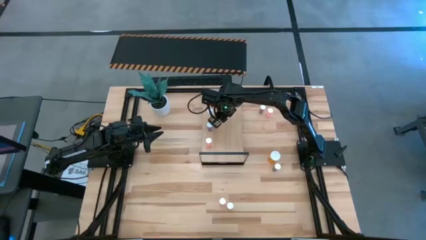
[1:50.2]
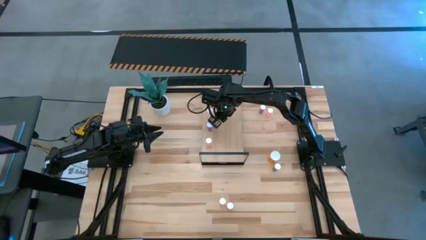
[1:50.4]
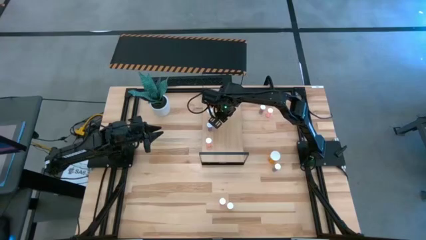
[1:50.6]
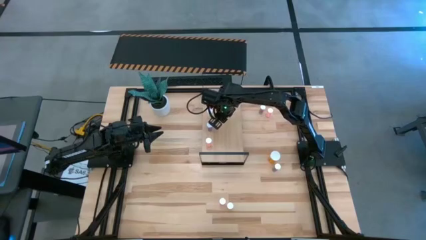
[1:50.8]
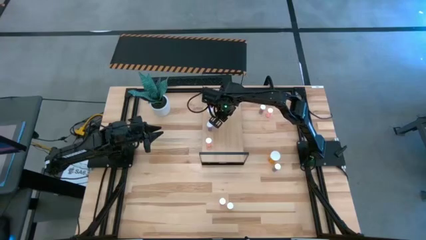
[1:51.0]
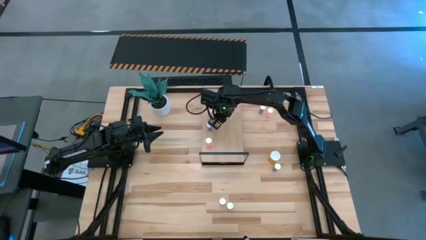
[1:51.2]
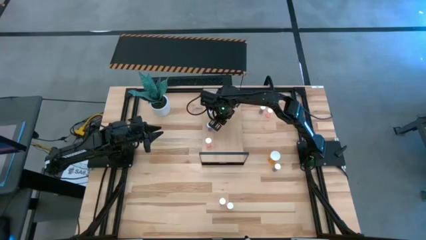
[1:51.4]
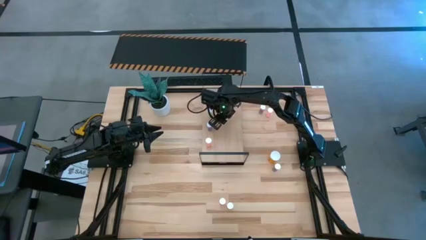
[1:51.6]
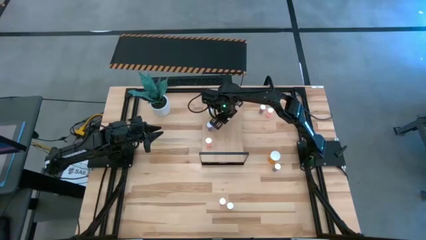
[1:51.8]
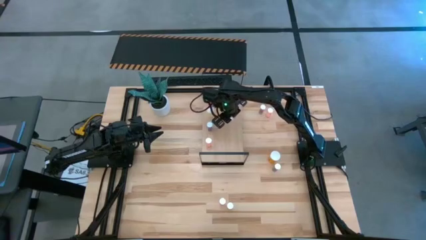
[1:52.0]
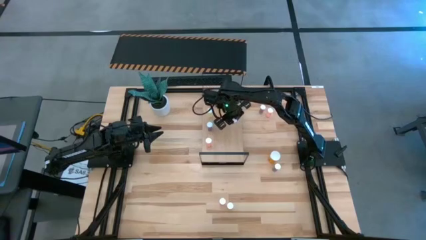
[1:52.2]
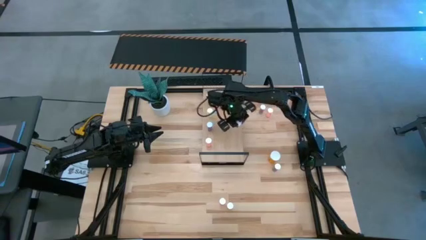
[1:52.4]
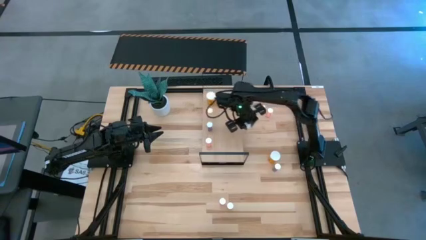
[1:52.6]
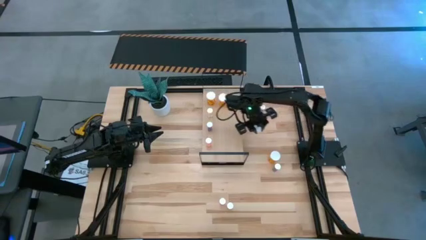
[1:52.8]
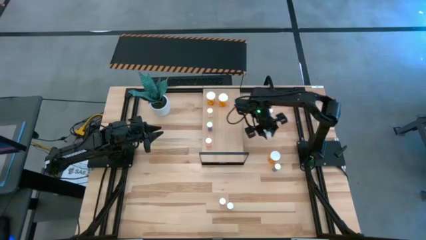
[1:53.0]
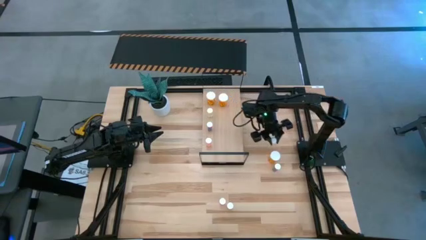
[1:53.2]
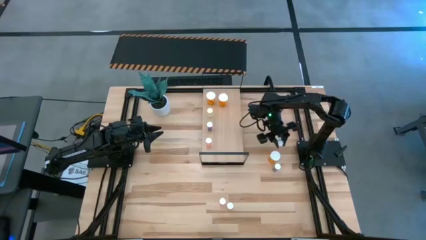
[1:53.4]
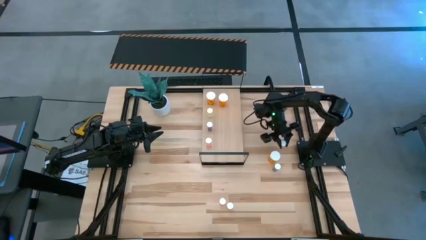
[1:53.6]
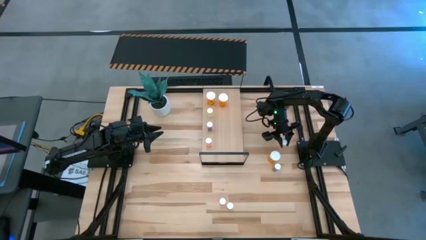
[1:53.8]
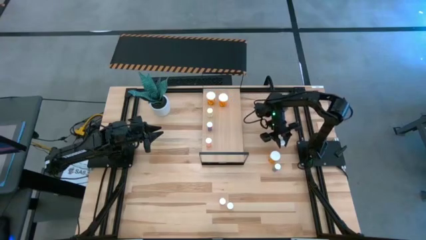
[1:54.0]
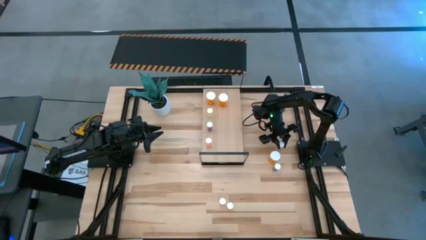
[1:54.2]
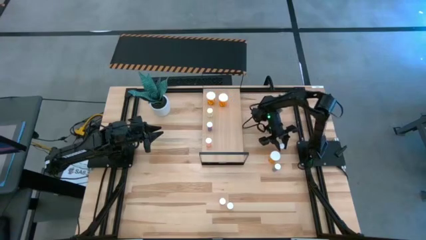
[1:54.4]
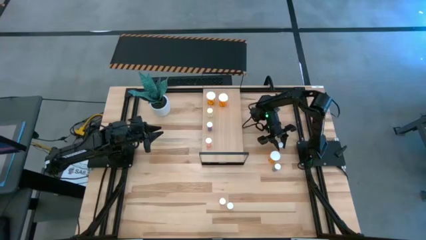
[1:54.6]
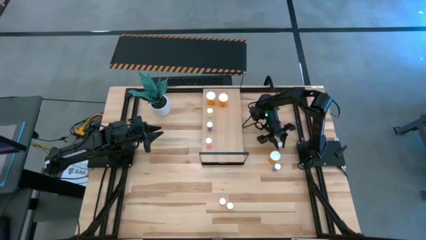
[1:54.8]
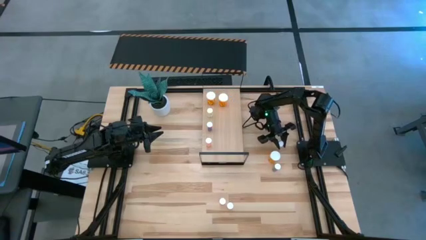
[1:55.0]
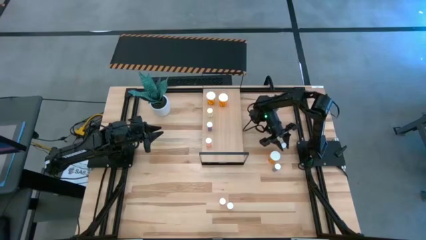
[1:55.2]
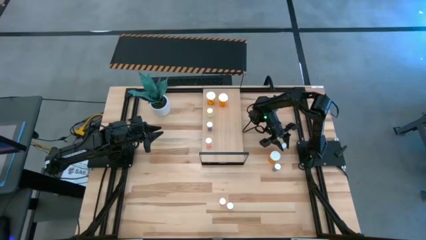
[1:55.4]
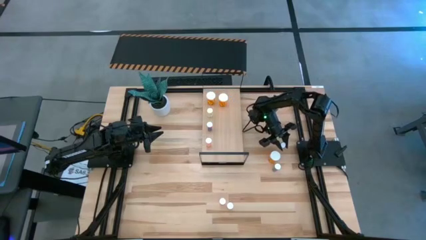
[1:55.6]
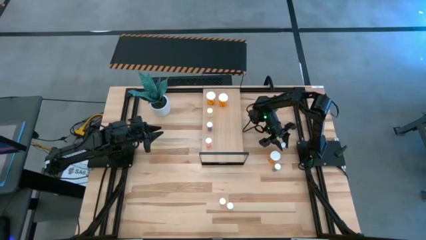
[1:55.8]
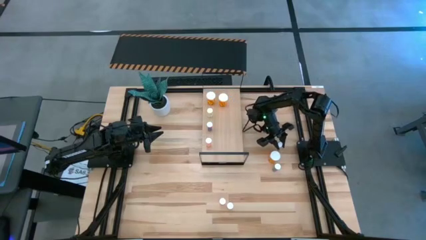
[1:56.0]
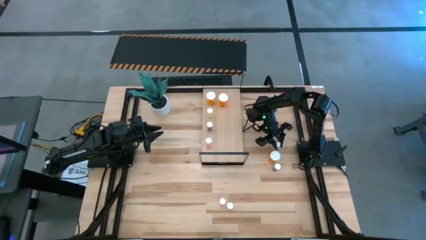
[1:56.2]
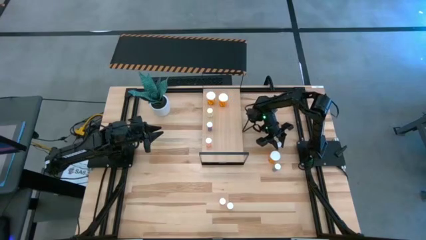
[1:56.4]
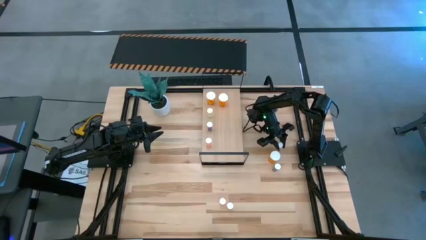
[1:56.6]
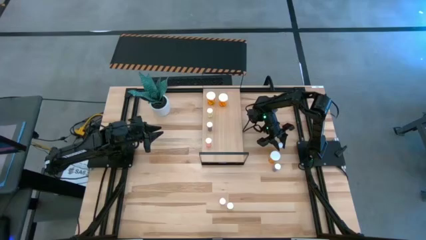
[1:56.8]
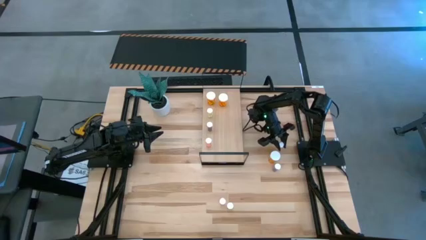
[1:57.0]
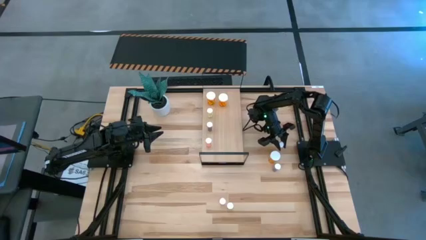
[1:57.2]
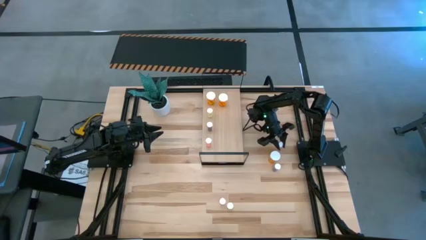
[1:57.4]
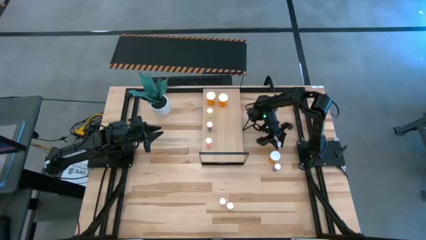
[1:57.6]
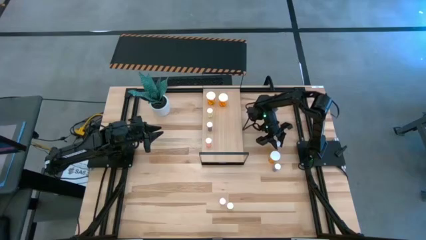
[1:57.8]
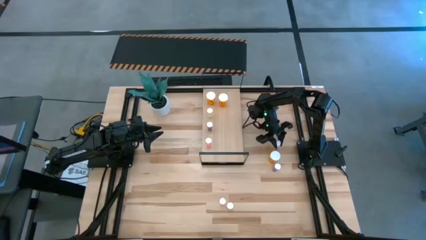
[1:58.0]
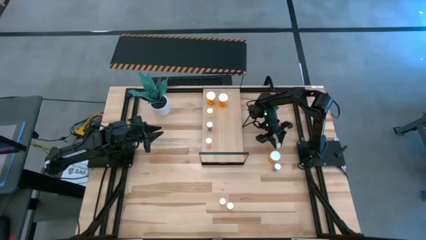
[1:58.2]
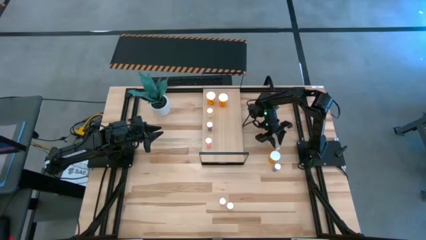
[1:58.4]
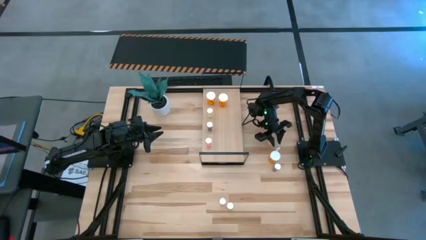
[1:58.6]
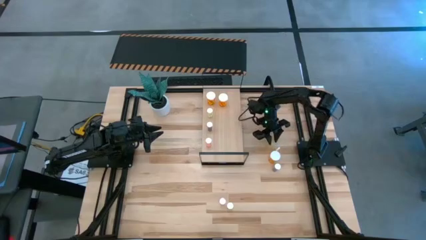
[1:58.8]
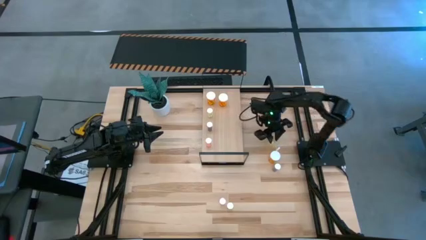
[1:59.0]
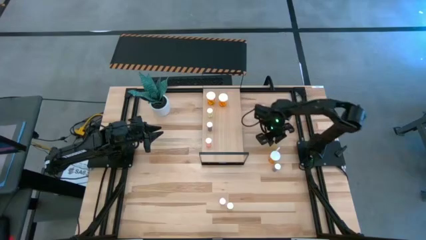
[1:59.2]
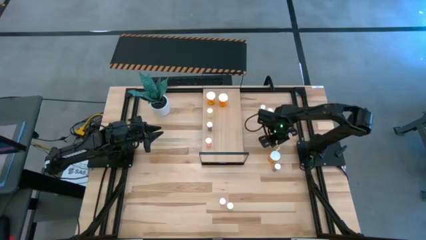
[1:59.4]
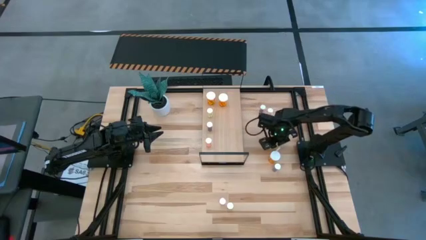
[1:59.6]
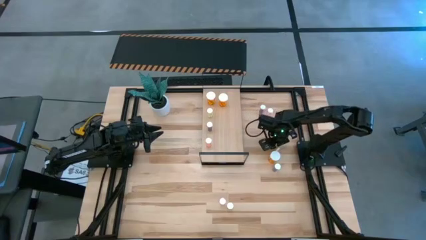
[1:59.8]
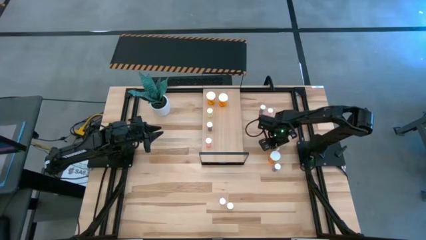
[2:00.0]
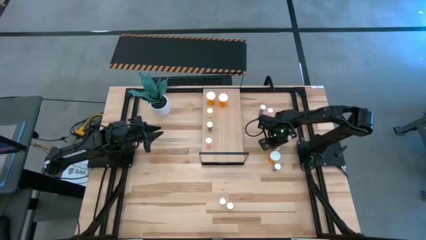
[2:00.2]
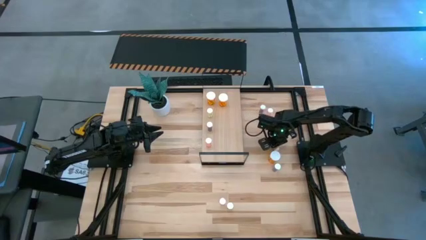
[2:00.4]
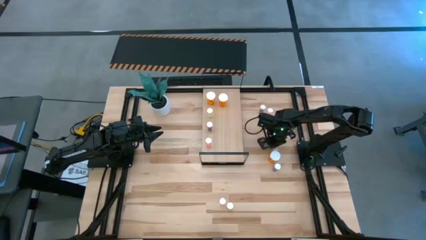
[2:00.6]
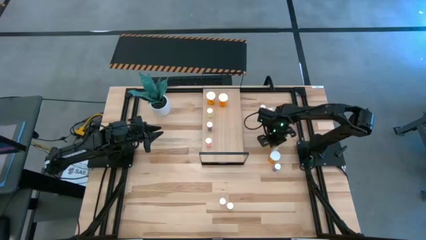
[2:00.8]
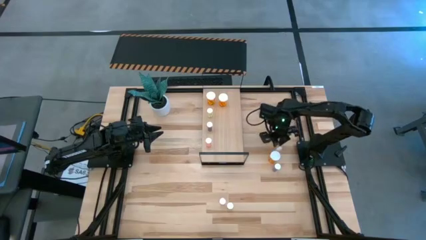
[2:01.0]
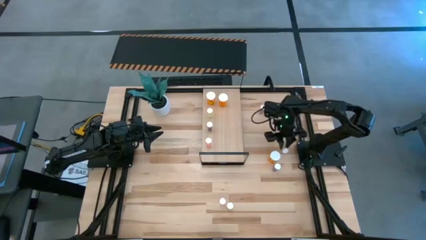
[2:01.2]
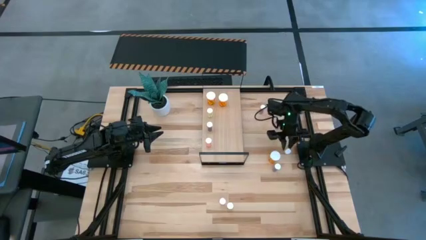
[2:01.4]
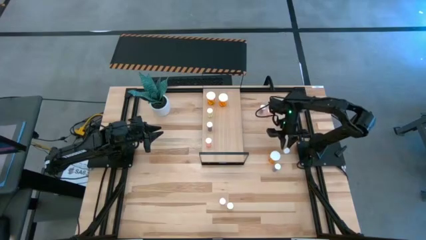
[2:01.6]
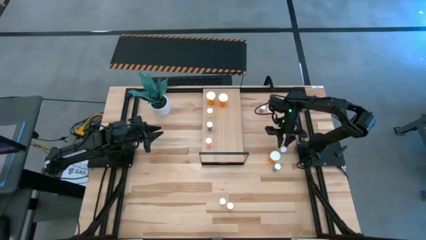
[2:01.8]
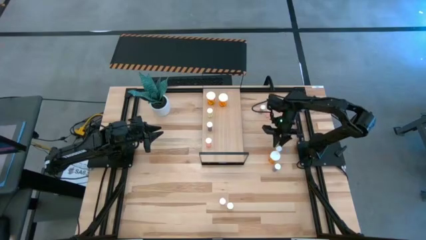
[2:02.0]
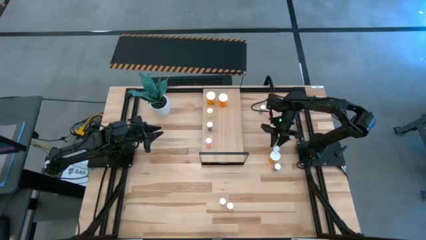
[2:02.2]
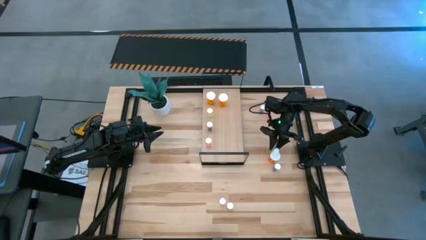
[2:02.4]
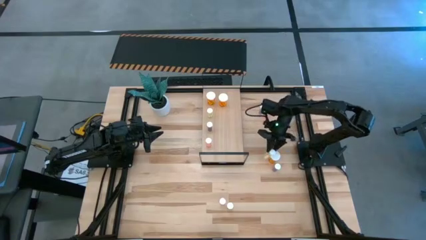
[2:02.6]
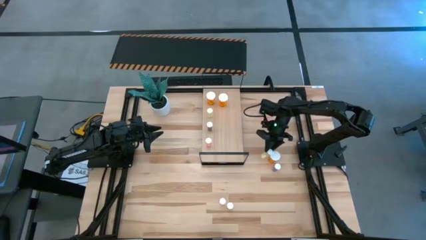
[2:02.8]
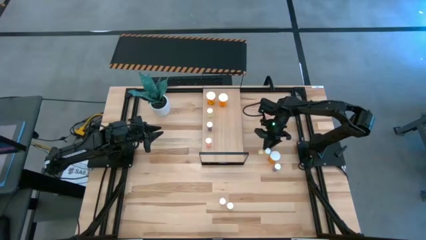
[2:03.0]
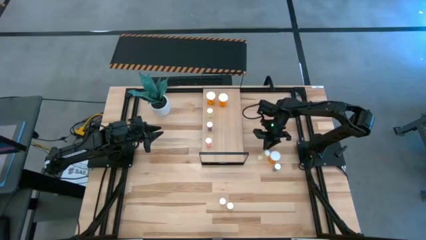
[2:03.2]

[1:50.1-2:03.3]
Task: Pick and place medicine bottles onto shelf by color
Put the bottom right small yellow pill bottle on the shelf aligned with the other small yellow pill bottle

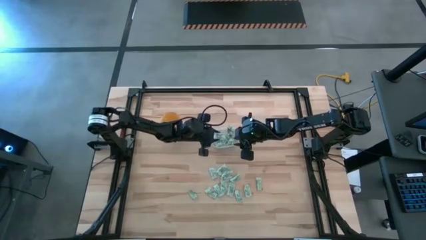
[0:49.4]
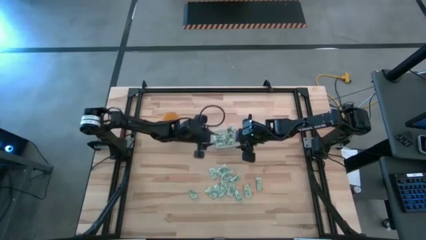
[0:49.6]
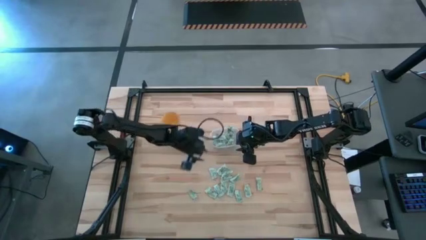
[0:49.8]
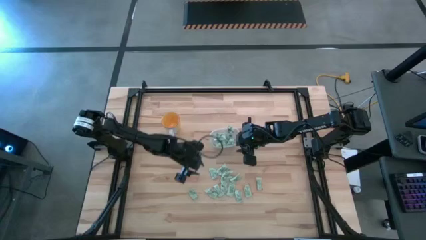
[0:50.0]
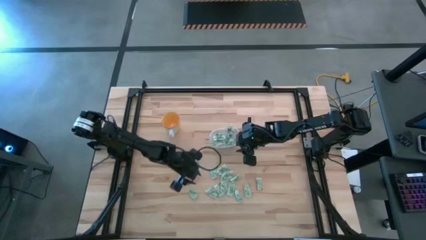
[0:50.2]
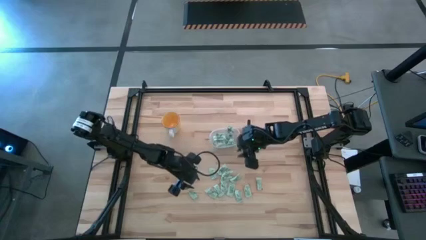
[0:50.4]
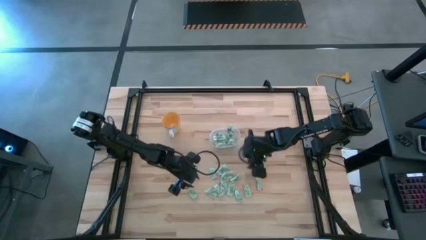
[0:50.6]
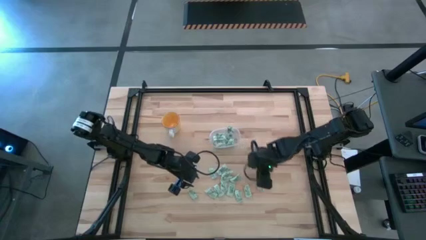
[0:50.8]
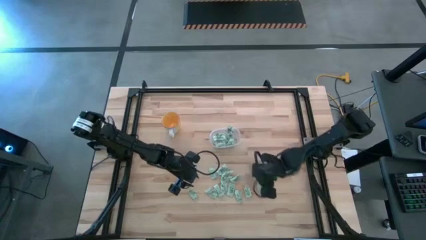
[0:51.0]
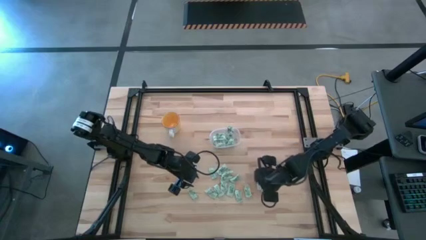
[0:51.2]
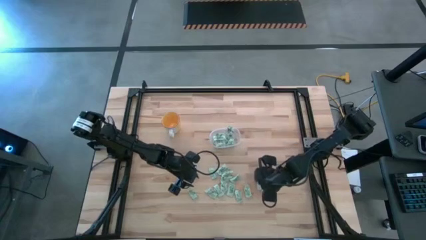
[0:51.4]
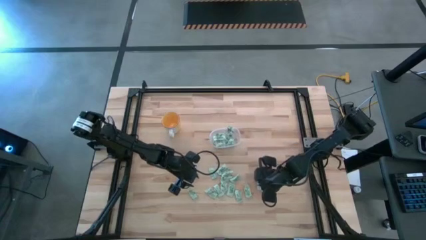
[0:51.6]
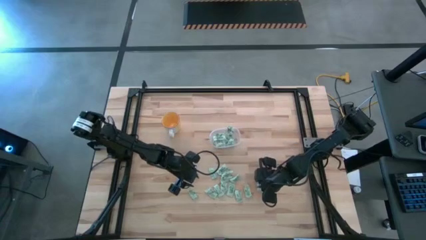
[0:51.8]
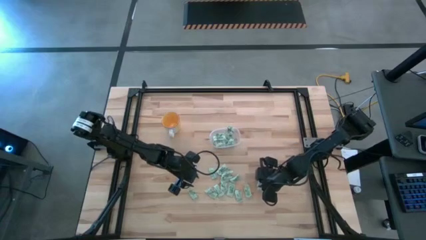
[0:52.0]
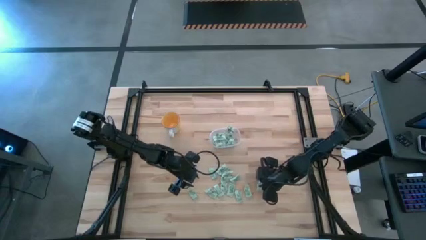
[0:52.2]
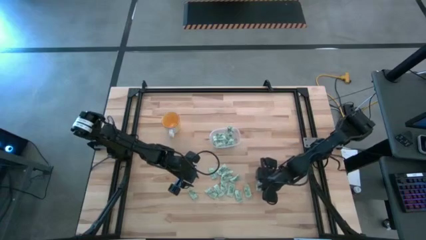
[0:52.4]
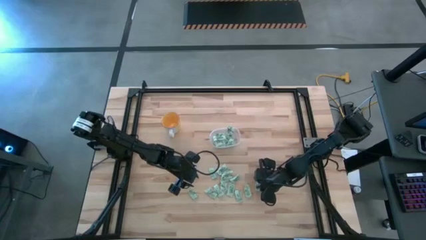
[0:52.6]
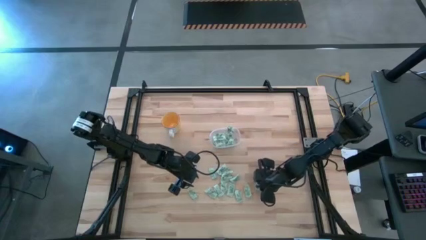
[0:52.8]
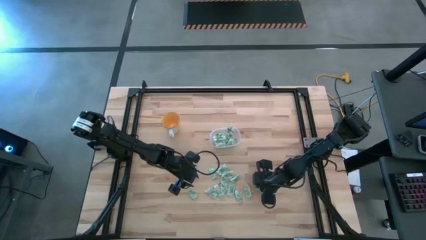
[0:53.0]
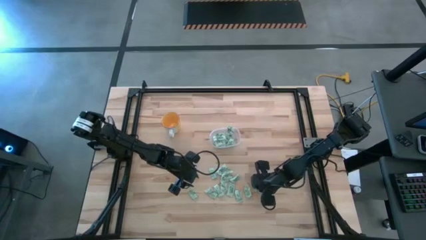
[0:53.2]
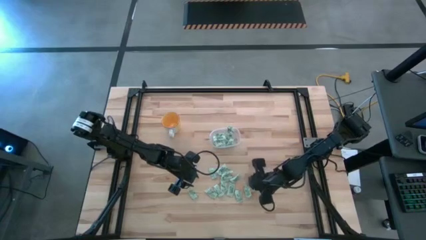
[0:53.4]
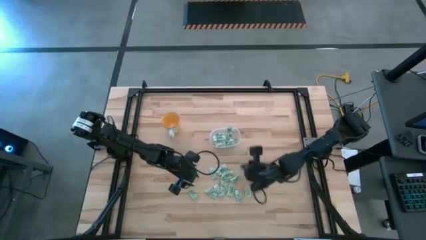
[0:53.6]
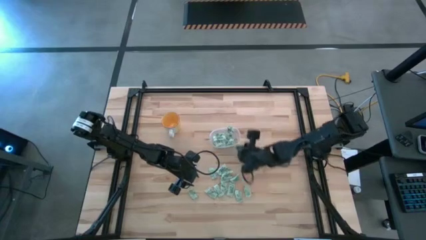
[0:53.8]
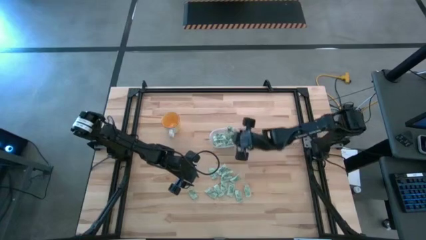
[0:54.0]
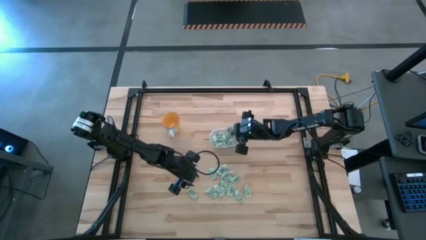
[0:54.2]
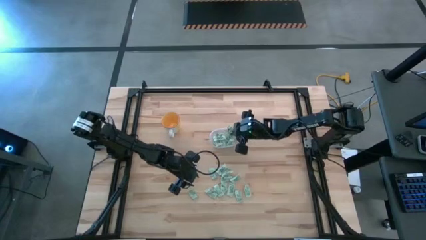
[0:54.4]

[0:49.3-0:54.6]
Task: Pick and place Stevia / Truvia into bins
Put the stevia packet into the transparent bin
